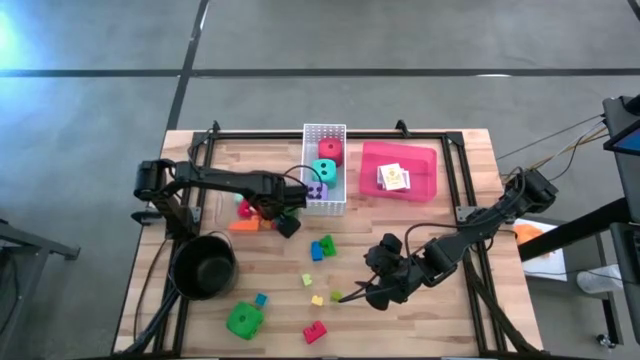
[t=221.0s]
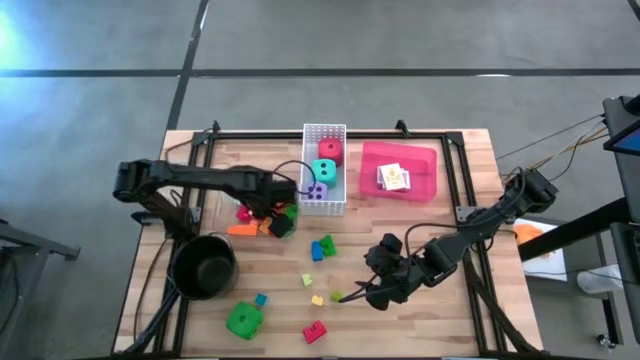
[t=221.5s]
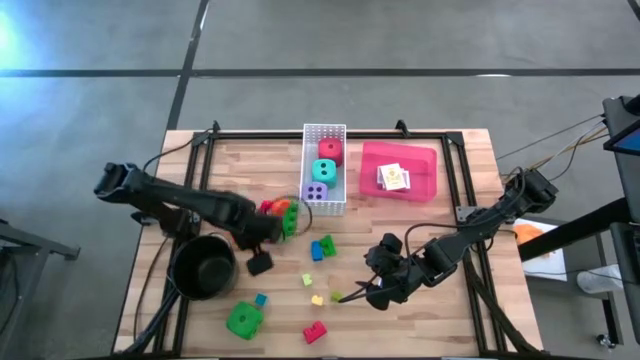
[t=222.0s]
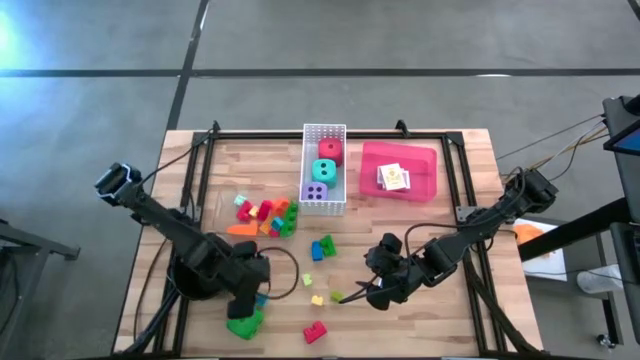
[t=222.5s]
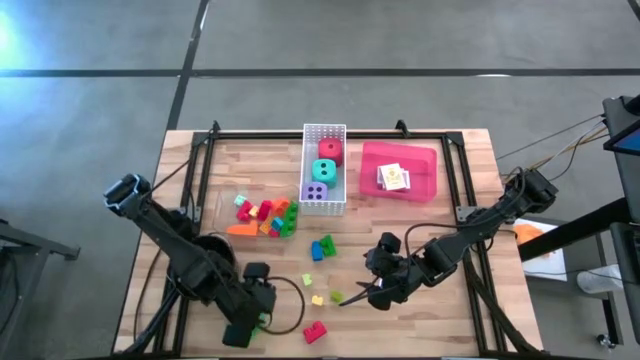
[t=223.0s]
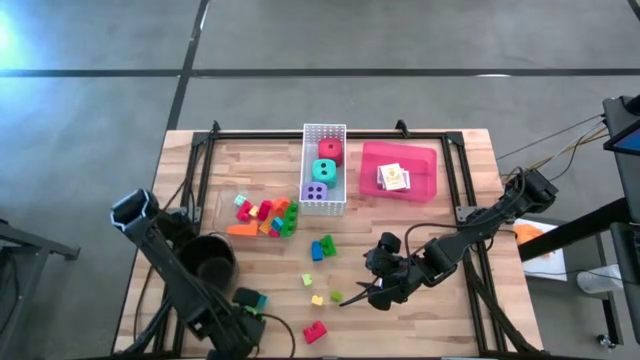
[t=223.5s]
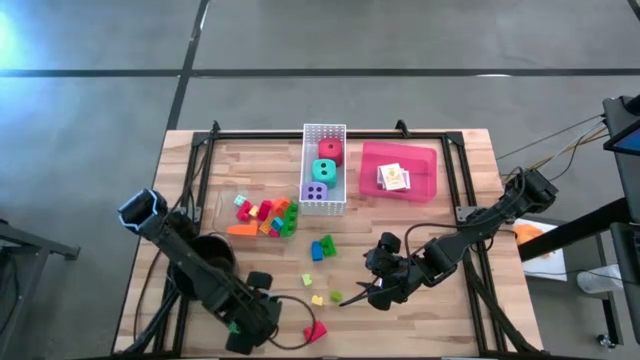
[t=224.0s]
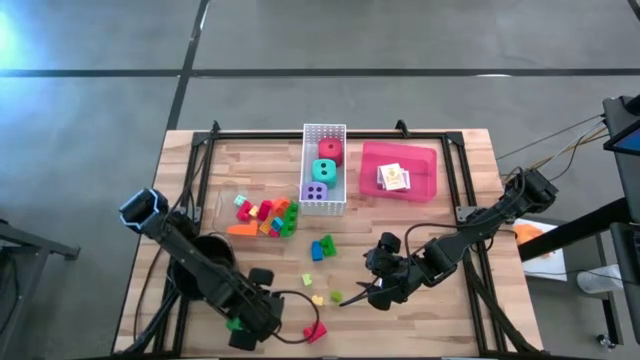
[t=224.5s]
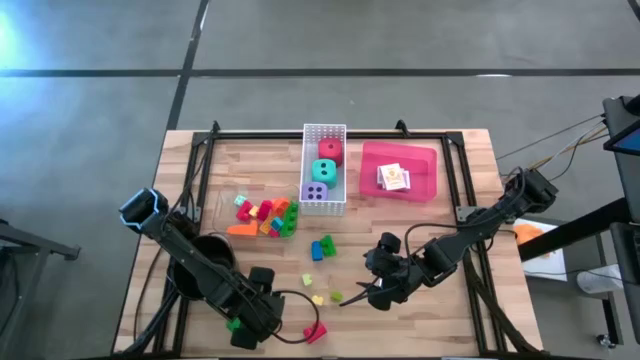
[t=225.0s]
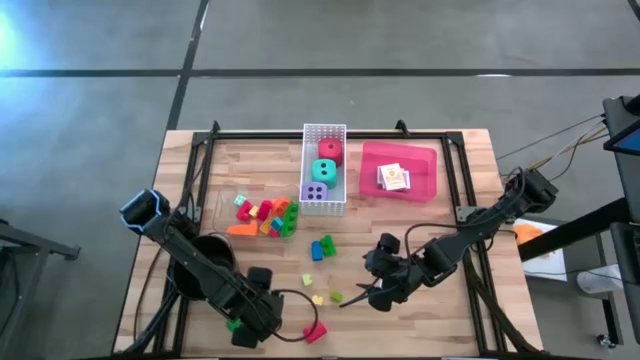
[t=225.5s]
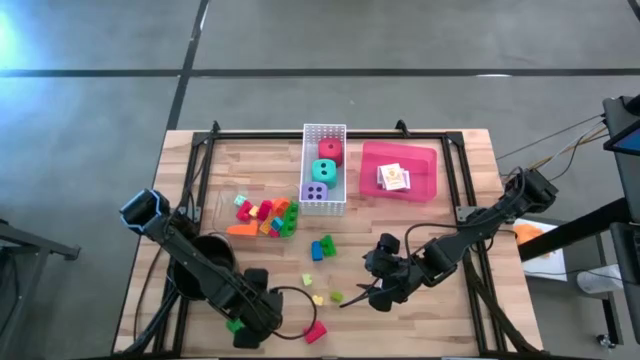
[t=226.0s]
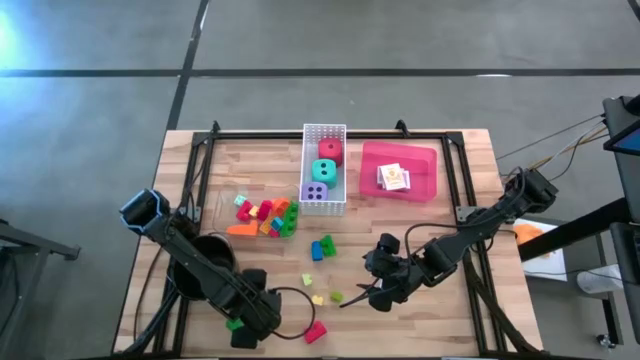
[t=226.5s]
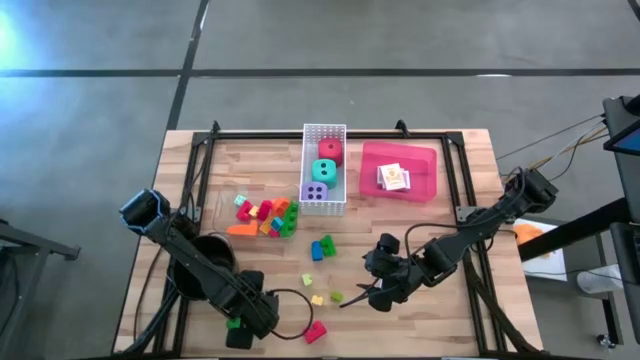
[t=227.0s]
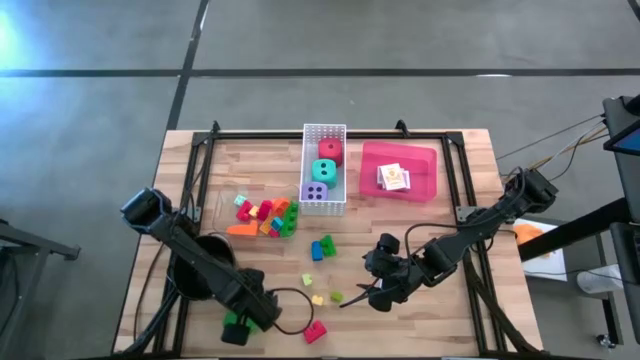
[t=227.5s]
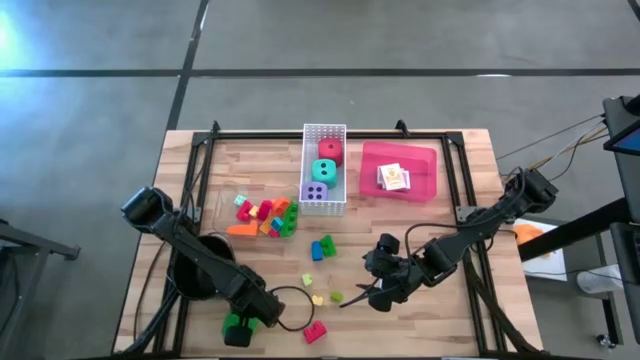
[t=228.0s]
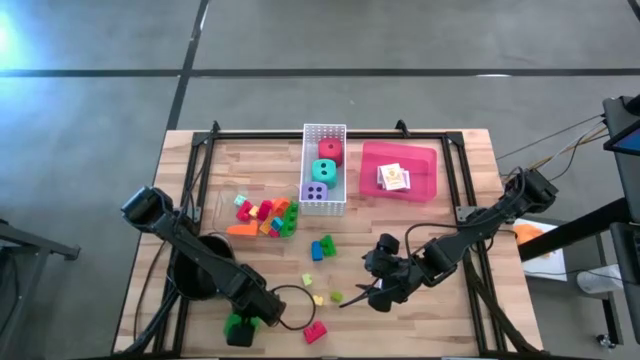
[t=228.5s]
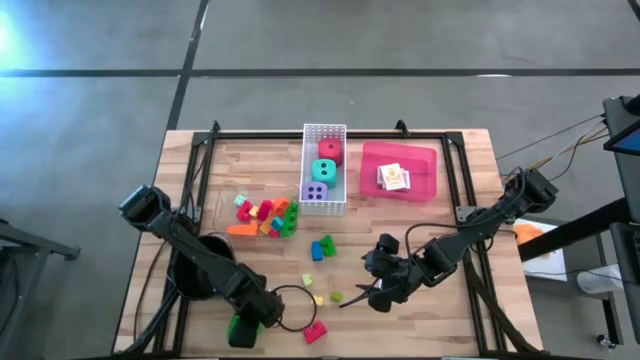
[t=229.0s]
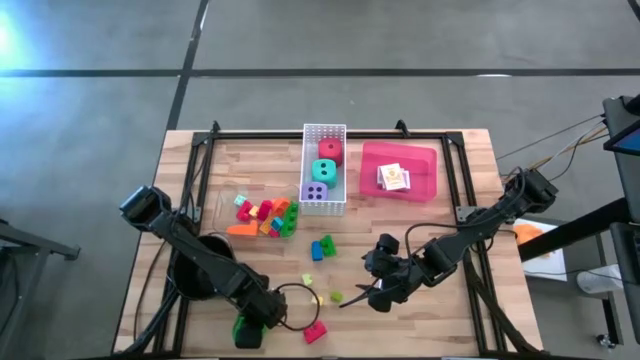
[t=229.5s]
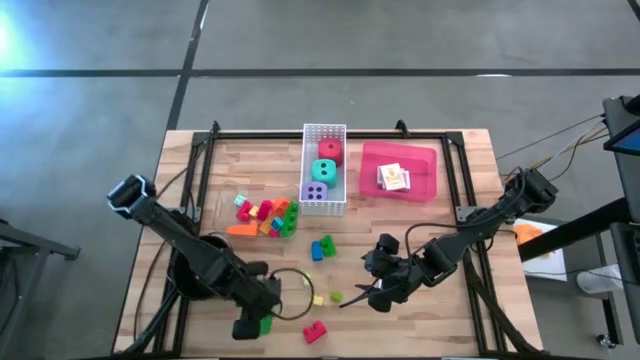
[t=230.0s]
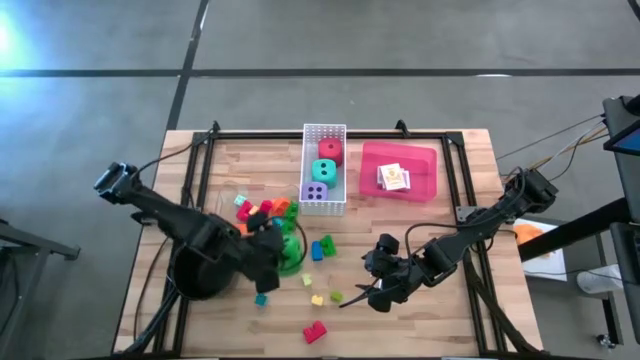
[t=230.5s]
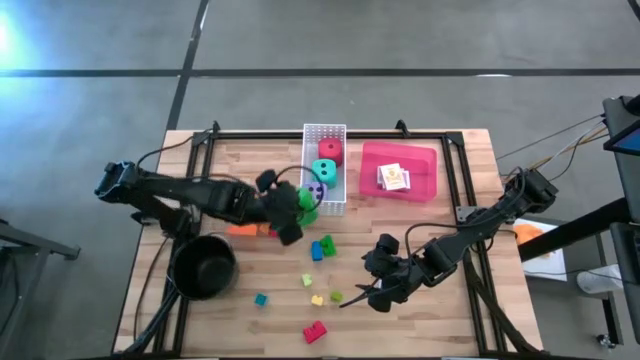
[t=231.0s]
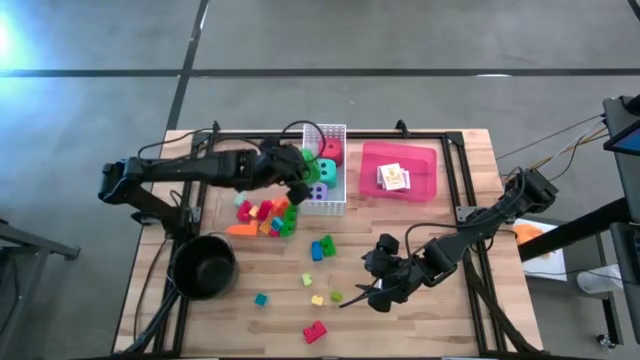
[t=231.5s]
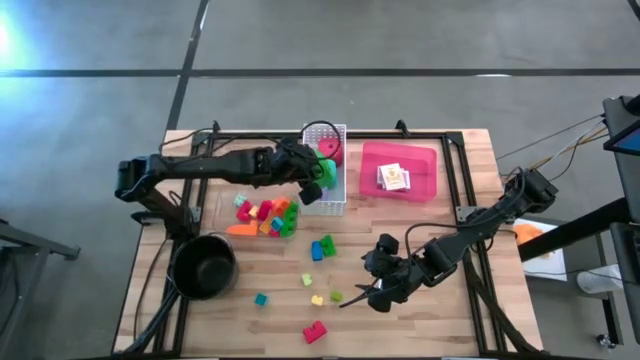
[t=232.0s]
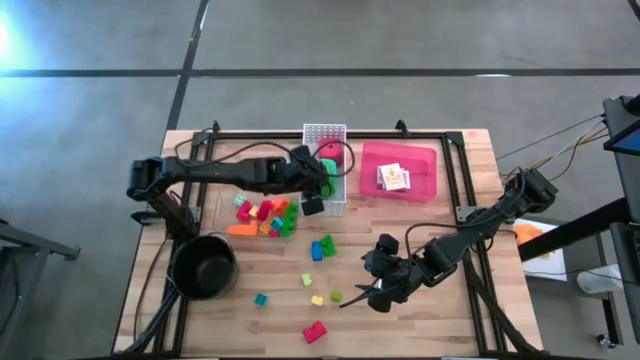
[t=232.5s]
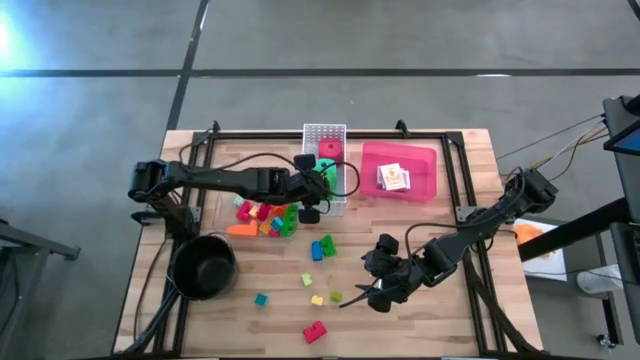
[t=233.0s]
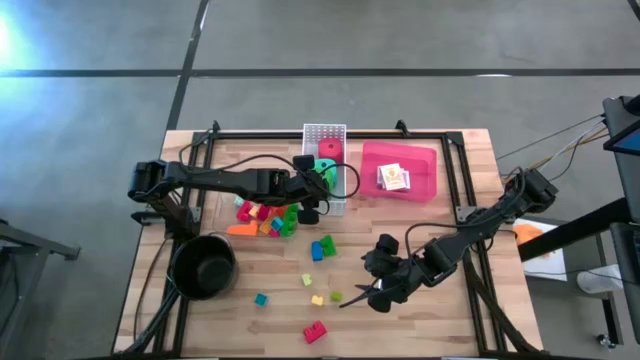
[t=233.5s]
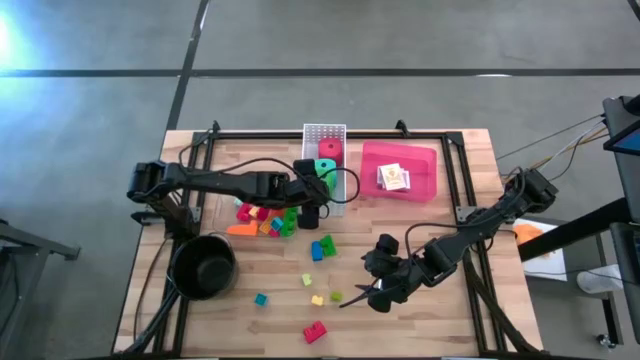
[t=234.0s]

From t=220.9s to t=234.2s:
Task: Pick & Place Toys
Put the green dice into the white bin

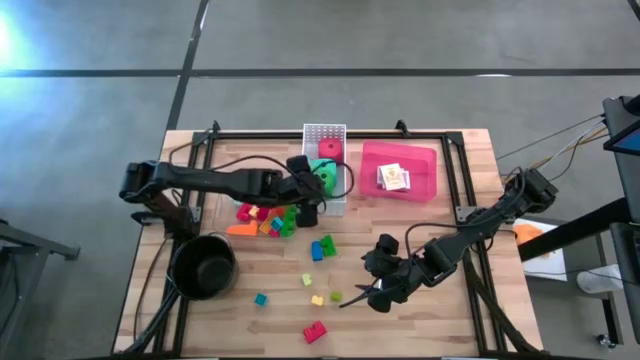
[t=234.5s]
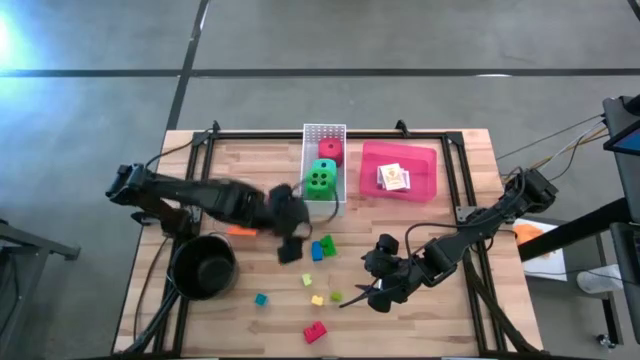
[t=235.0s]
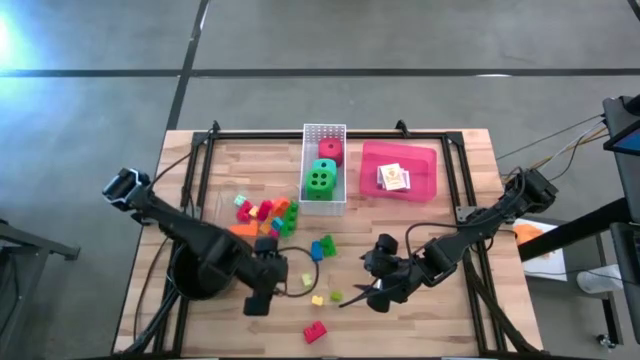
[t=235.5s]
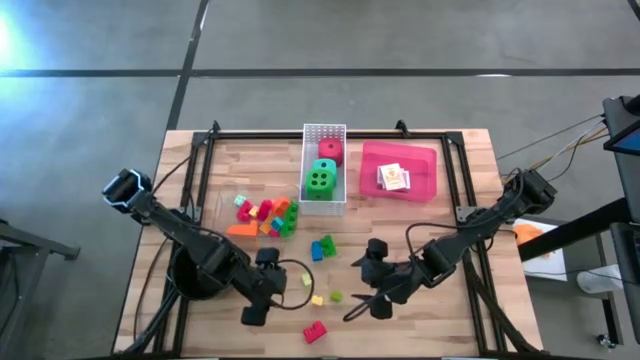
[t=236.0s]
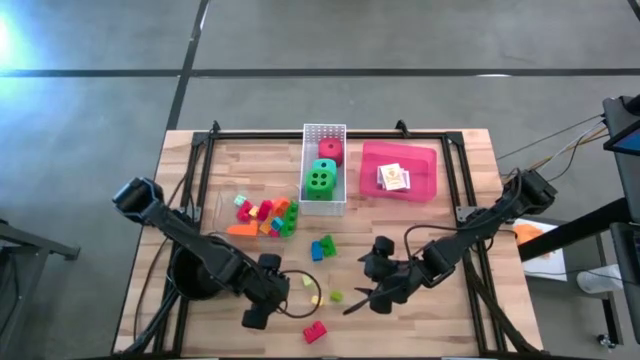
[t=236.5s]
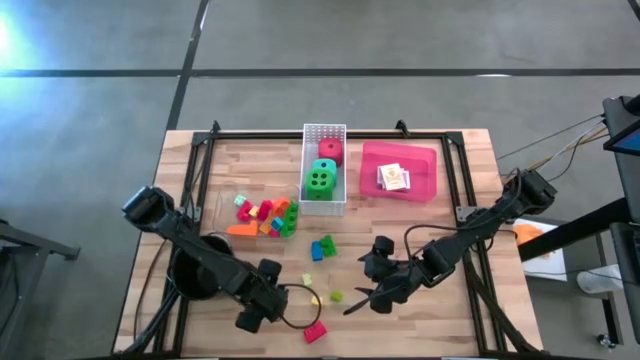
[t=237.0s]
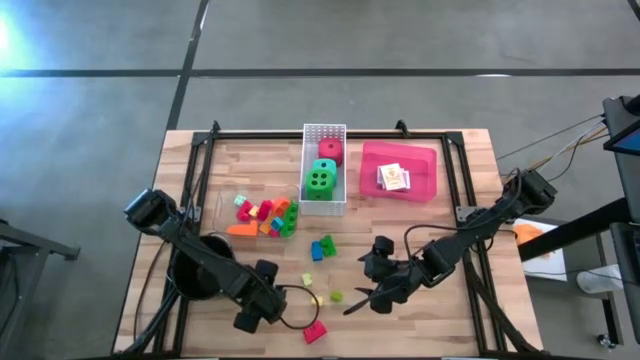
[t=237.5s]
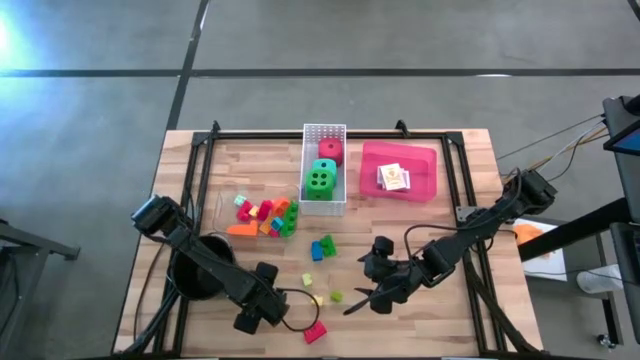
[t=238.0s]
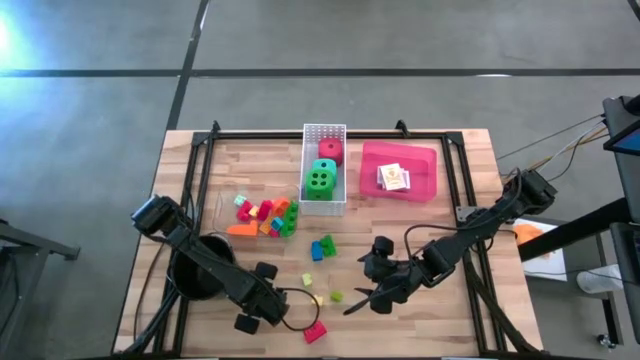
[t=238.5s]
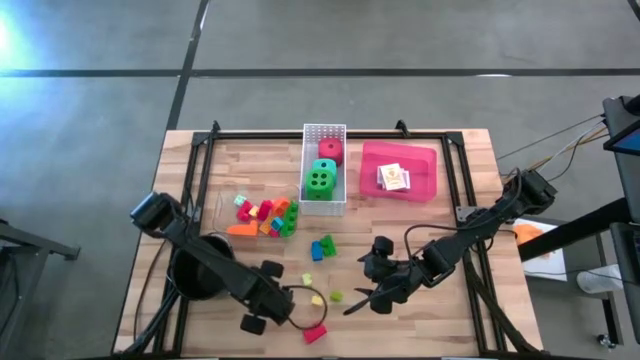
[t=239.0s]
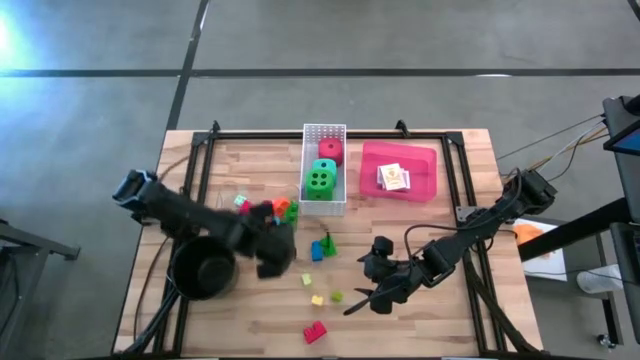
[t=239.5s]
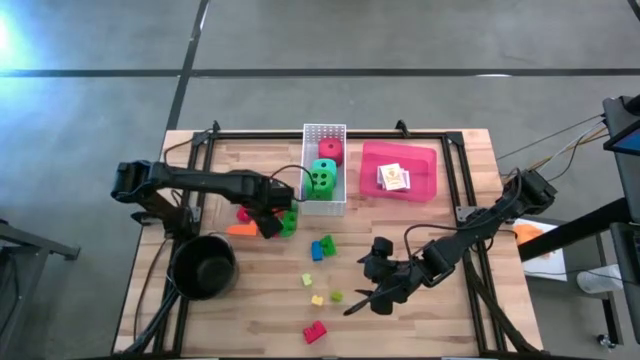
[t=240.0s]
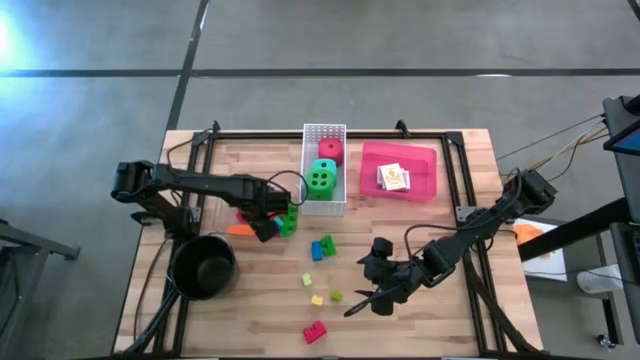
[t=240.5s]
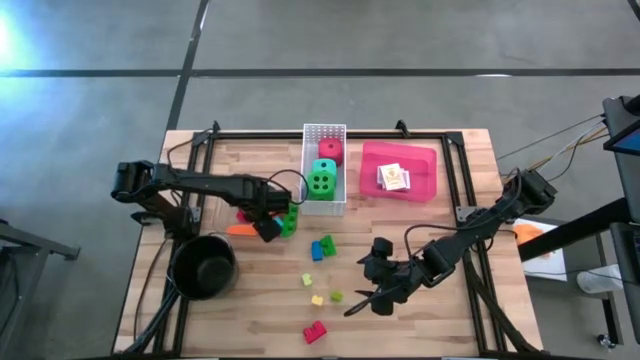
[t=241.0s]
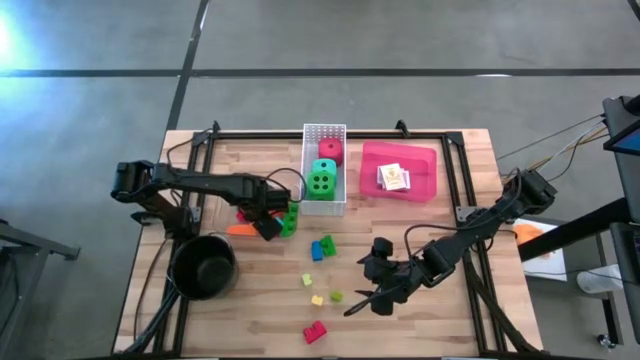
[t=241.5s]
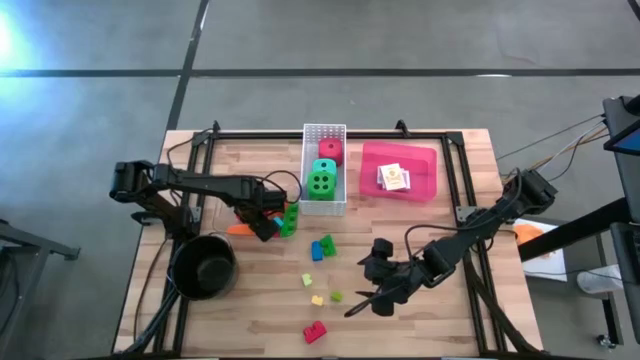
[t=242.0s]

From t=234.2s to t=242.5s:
Put the light blue game piece into the transparent bin
